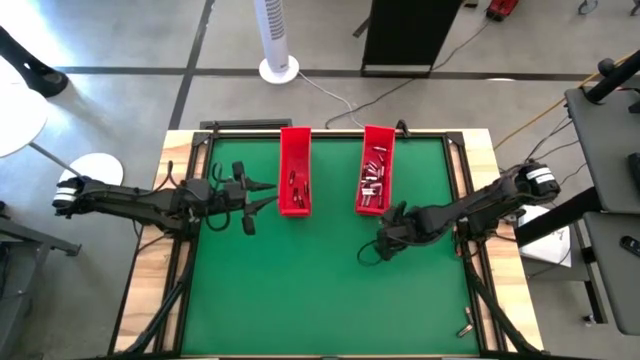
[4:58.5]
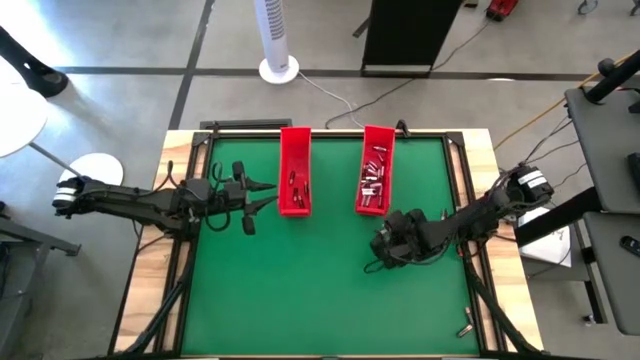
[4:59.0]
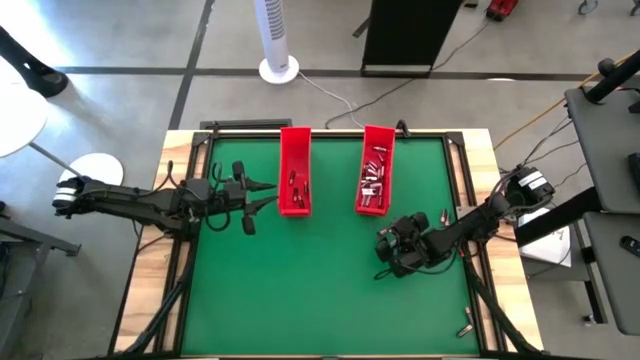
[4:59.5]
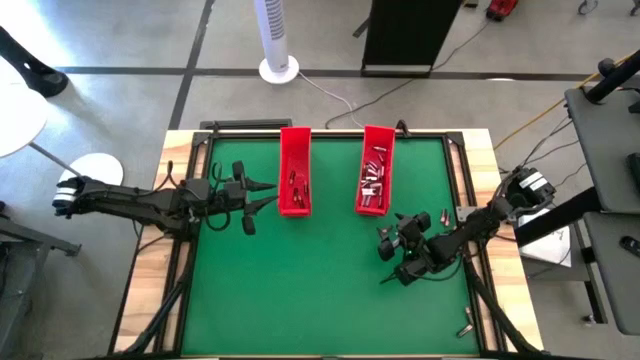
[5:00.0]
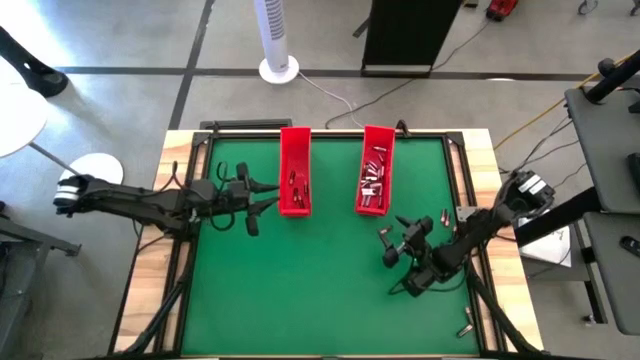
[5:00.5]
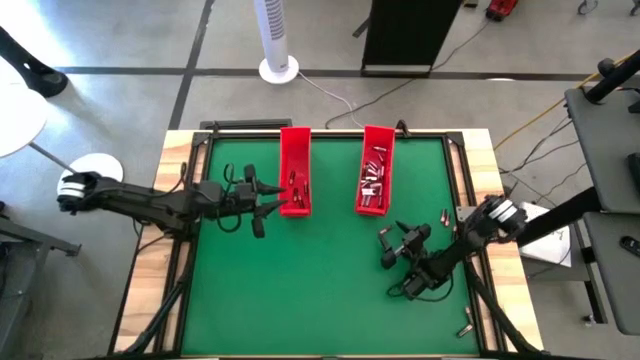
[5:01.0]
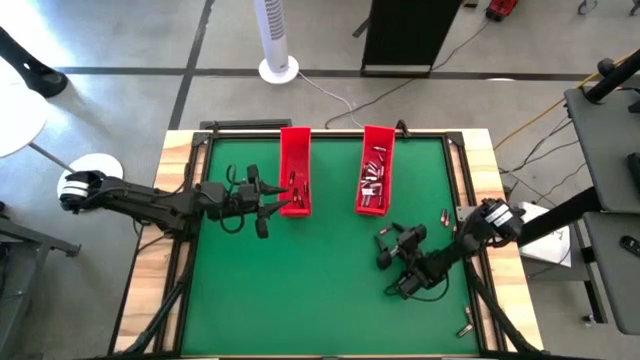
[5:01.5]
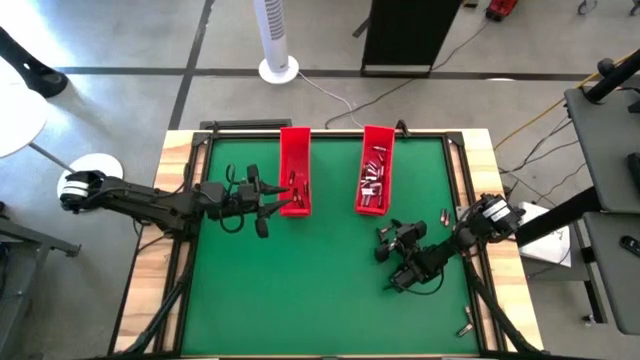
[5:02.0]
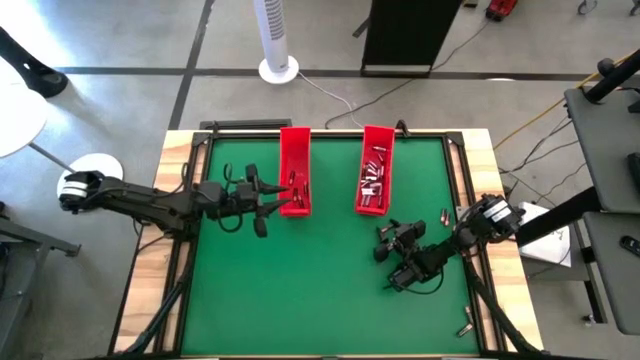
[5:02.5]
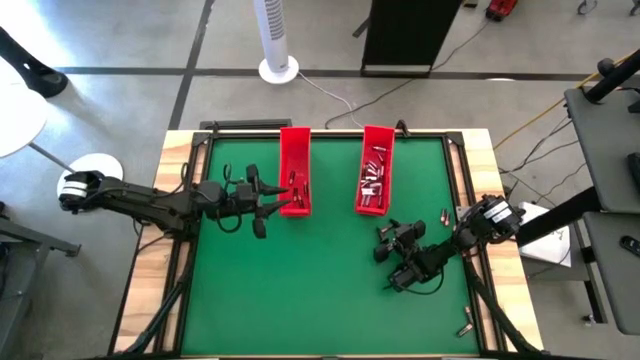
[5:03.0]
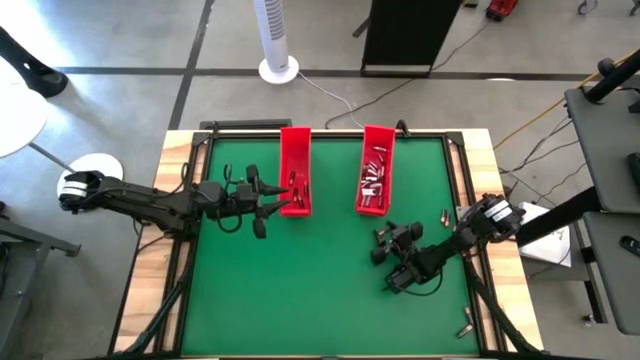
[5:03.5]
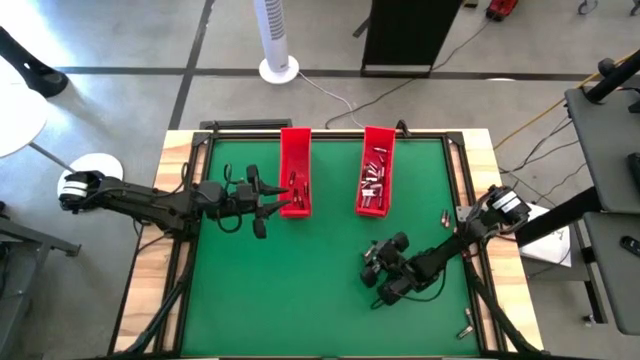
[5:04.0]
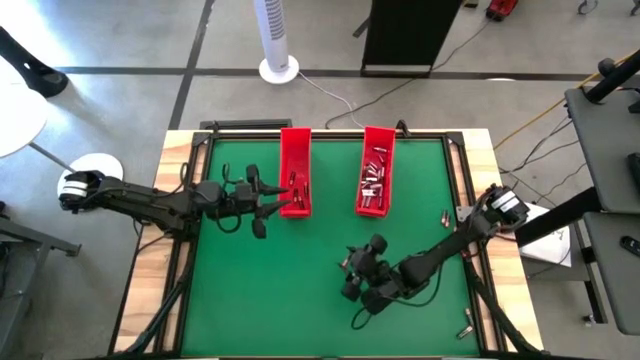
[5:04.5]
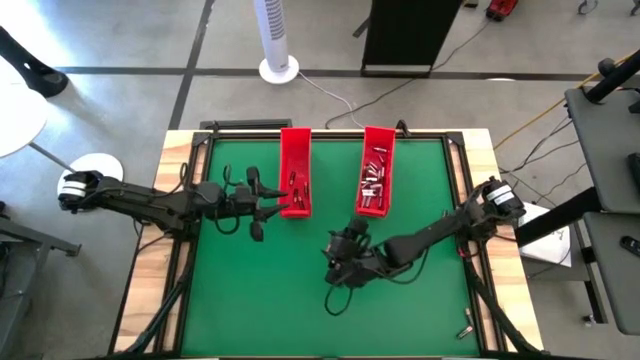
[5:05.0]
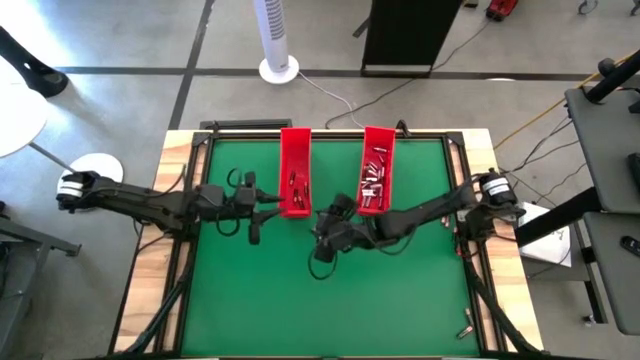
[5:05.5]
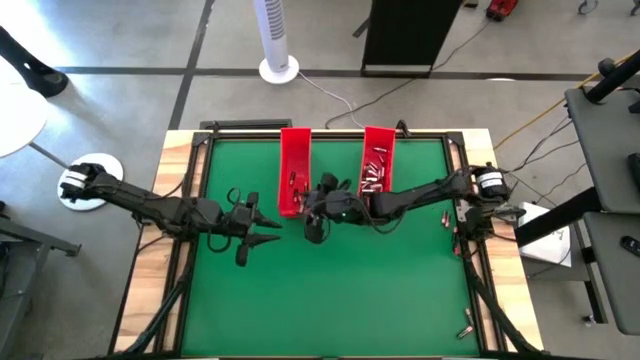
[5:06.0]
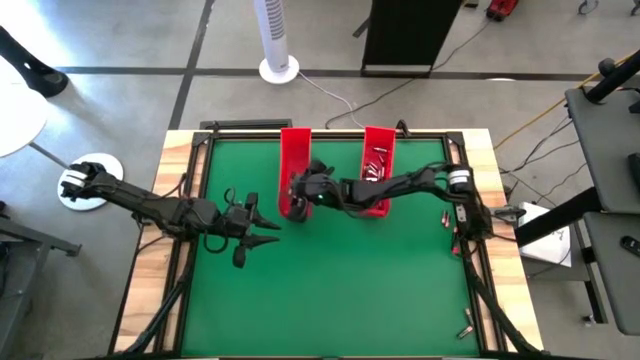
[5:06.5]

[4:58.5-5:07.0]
Task: Sort batteries
Put the black battery into the left red bin

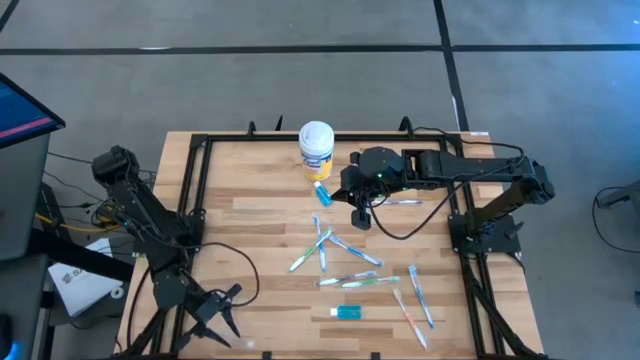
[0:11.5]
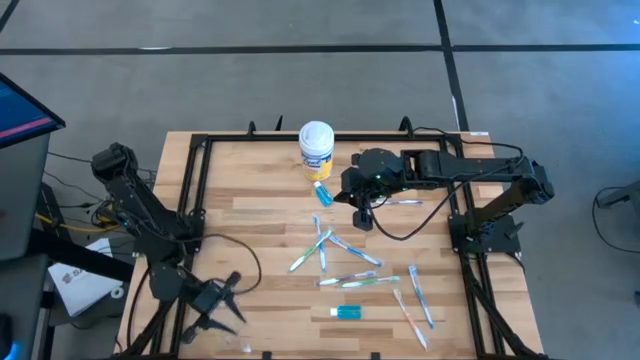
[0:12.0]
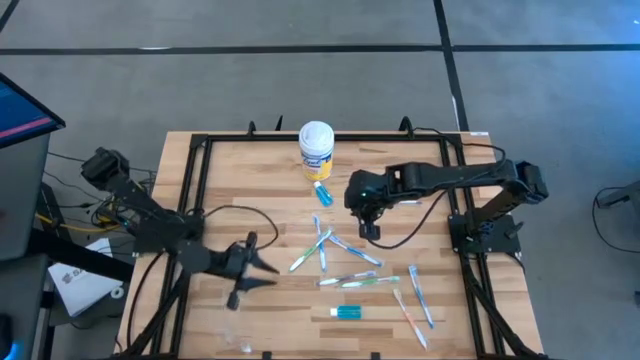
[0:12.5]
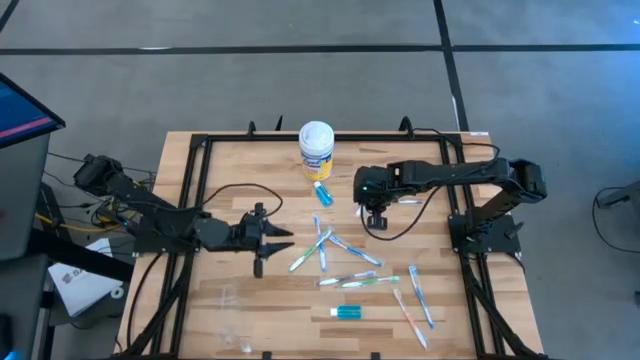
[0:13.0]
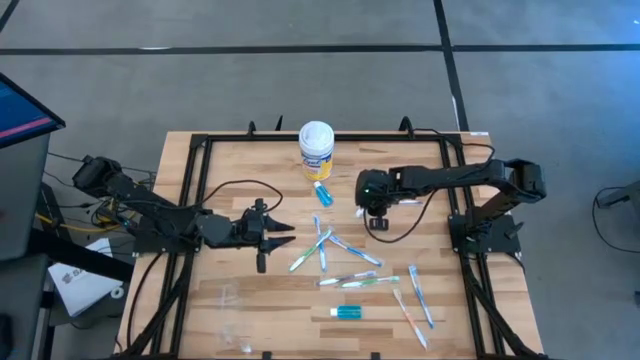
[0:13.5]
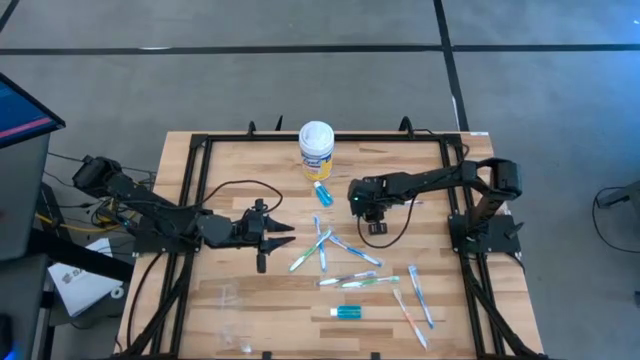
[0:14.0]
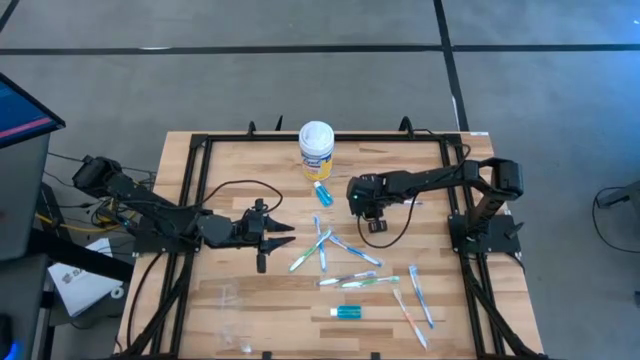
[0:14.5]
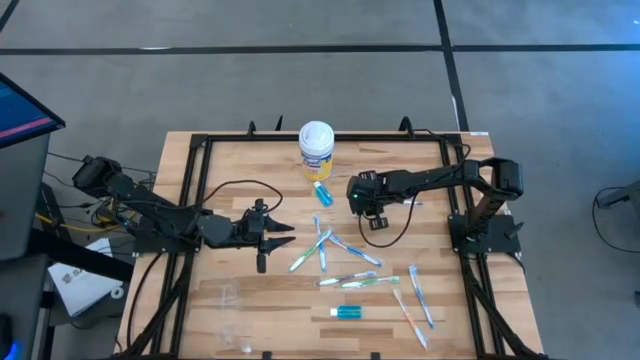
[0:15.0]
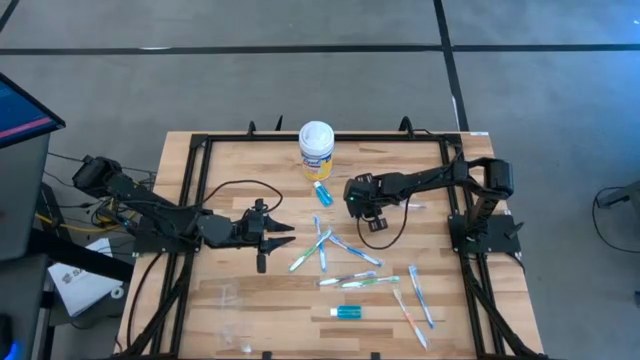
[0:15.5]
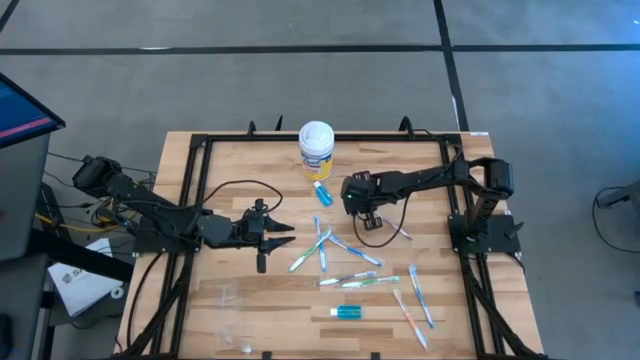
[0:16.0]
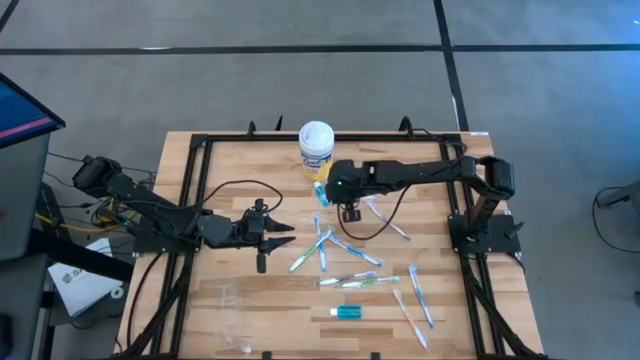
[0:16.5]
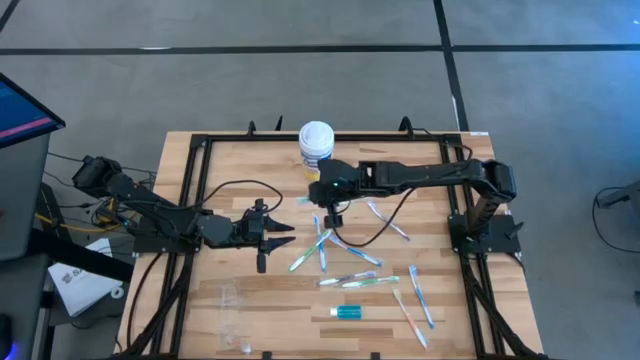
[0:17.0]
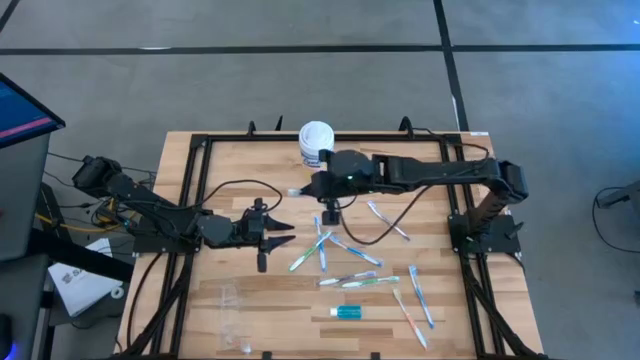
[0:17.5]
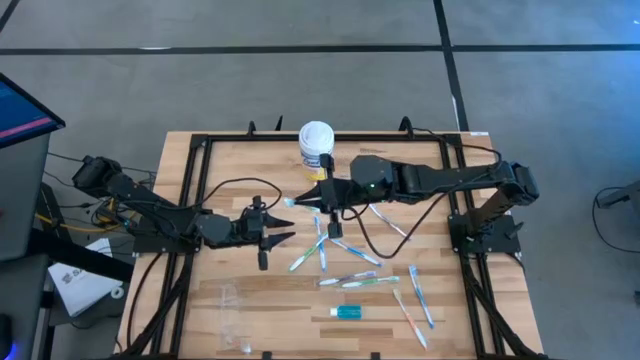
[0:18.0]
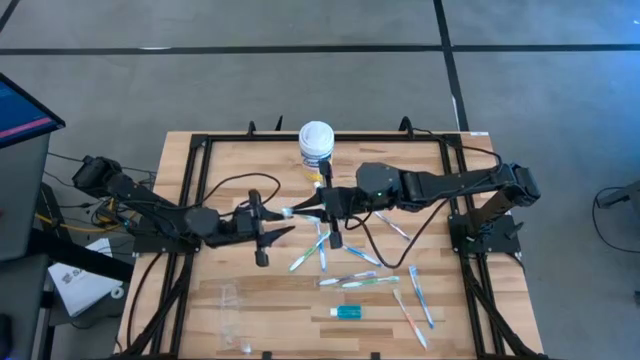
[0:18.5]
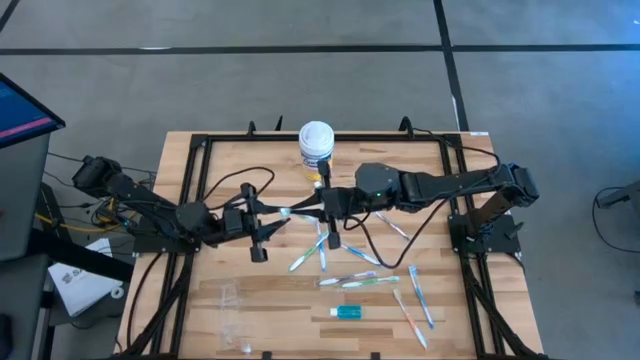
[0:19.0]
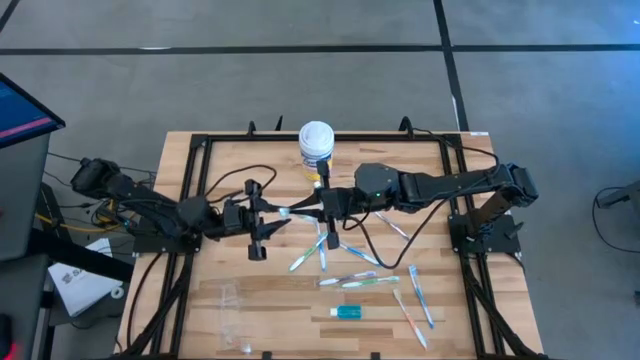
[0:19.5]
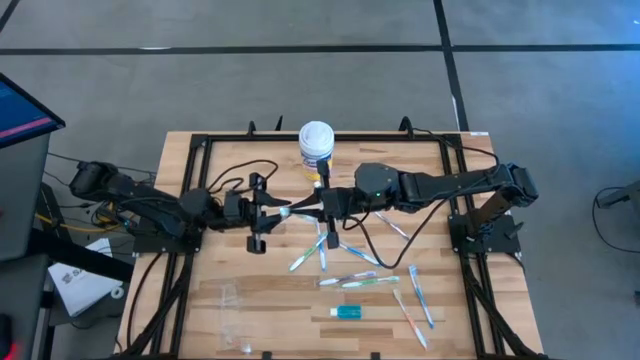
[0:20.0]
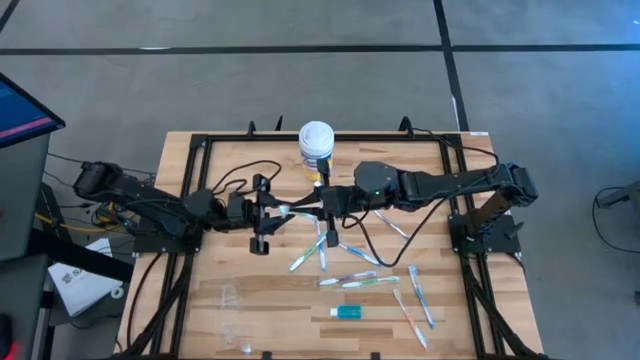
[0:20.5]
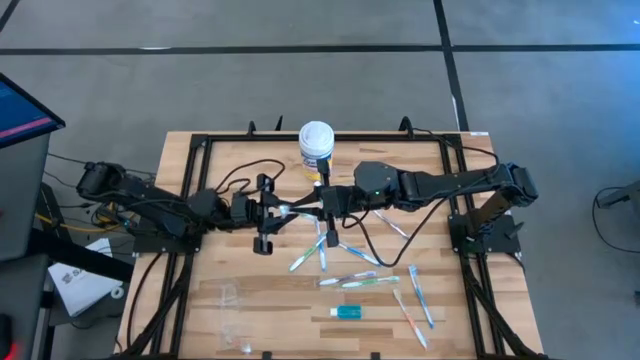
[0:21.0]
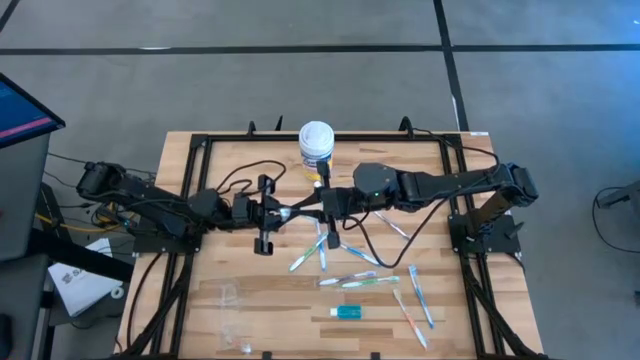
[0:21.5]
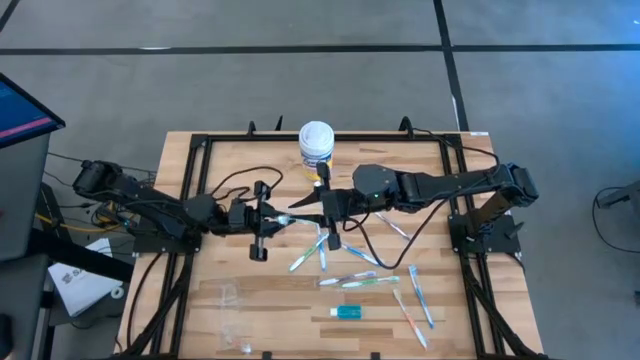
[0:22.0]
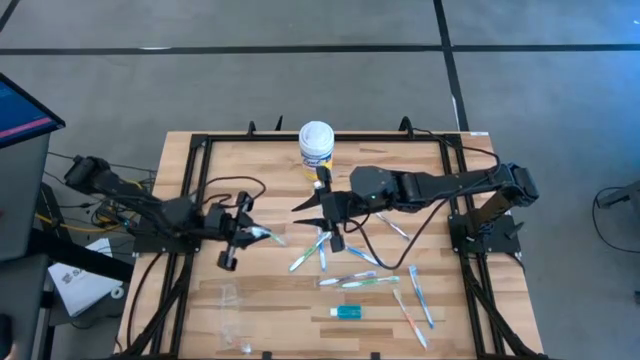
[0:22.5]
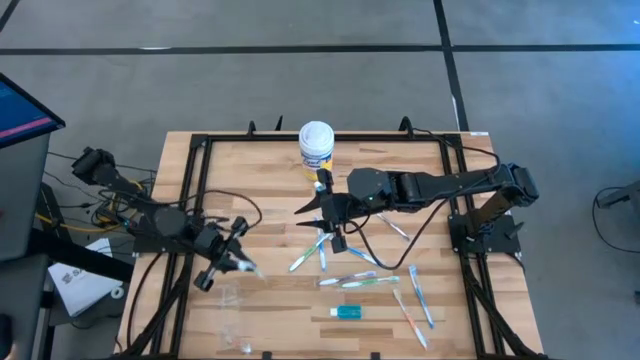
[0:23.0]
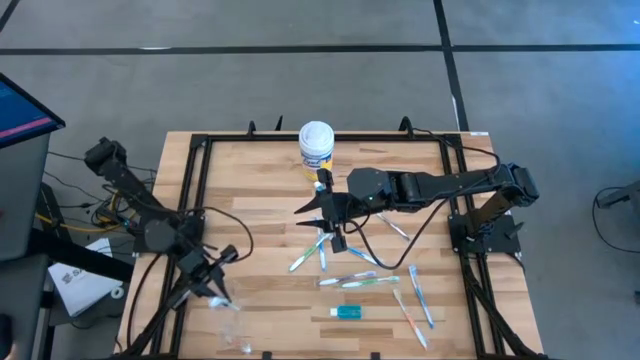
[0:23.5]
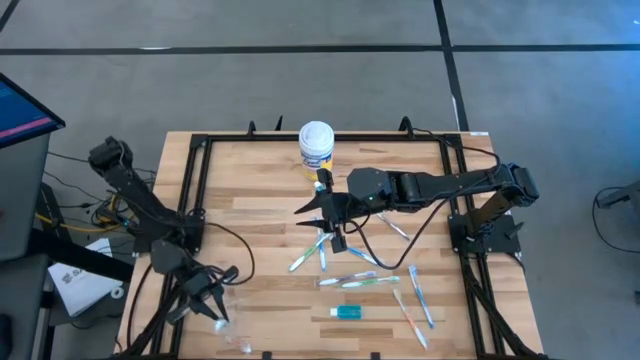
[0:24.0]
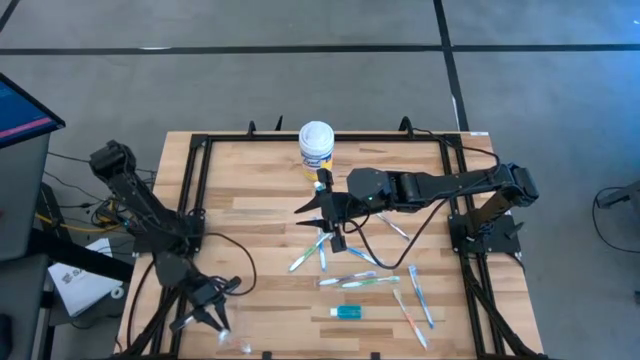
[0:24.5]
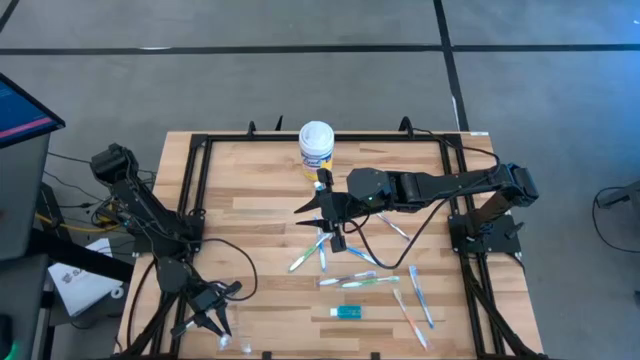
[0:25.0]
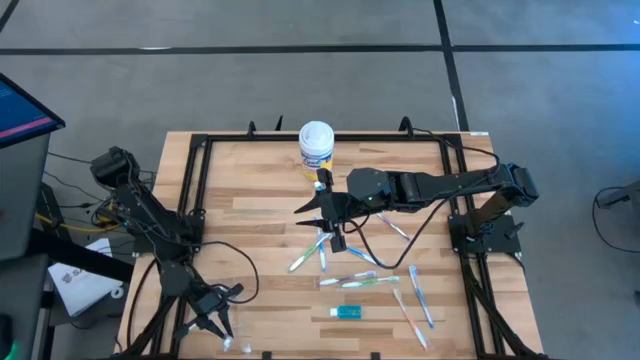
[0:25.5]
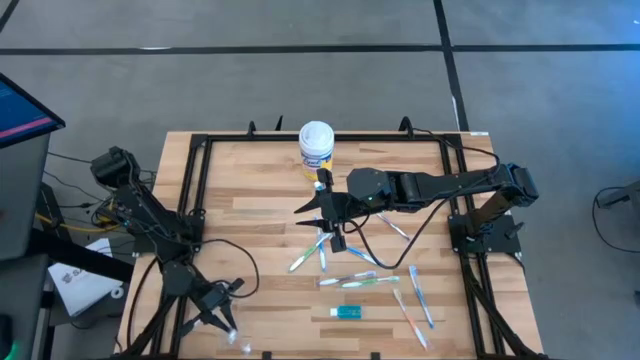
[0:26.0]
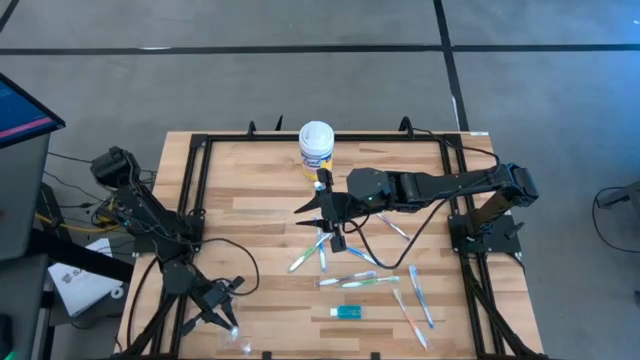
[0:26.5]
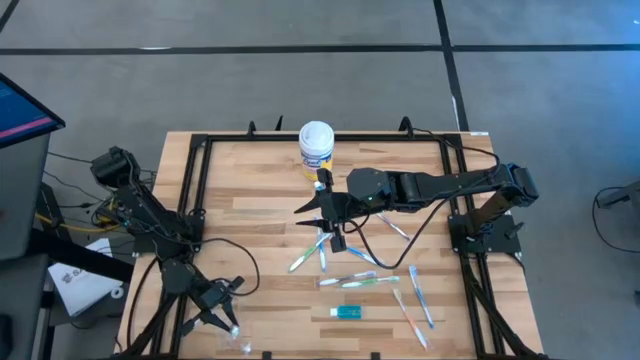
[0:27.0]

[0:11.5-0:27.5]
Task: Pick & Place toothbrushing station
Put the top green toothbrush into the transparent organizer
